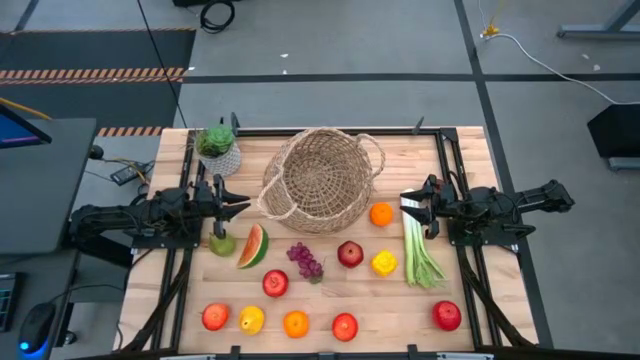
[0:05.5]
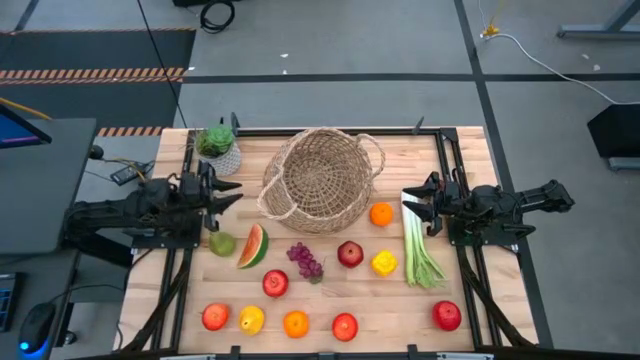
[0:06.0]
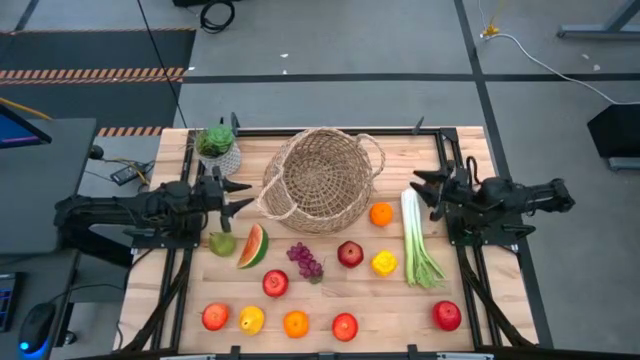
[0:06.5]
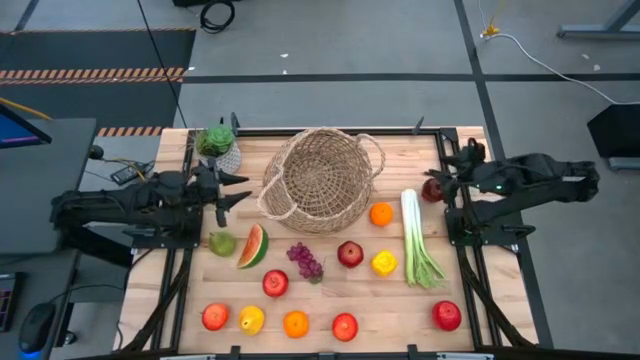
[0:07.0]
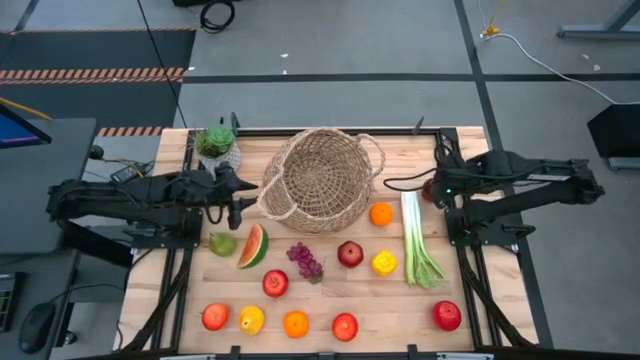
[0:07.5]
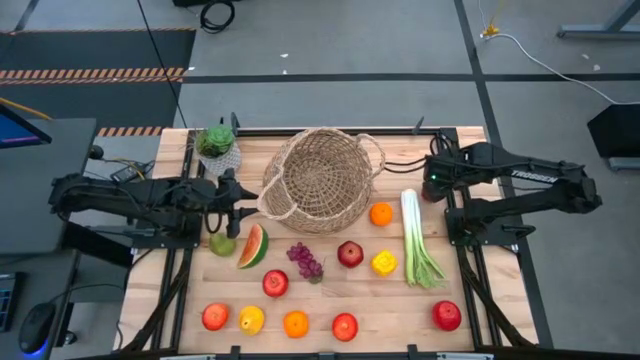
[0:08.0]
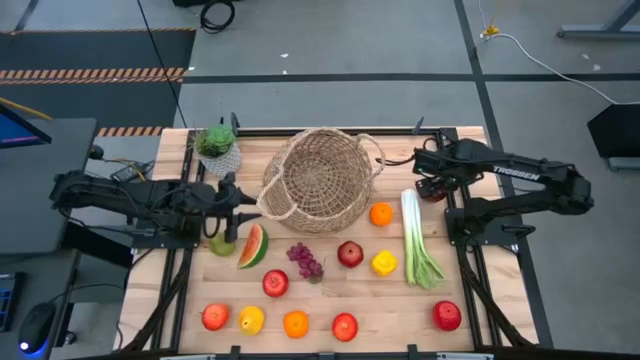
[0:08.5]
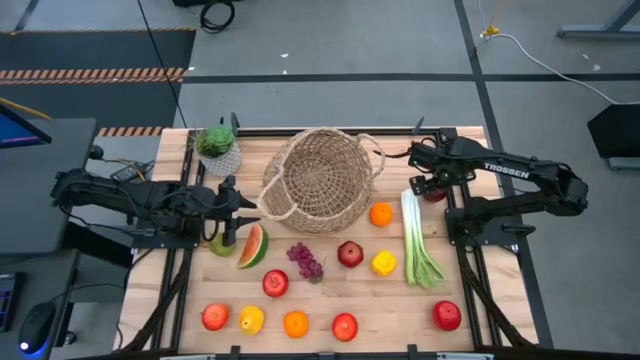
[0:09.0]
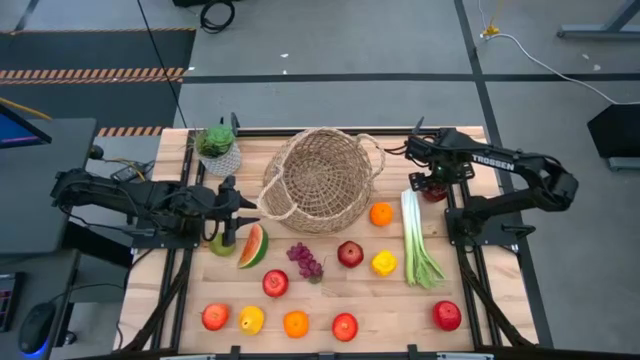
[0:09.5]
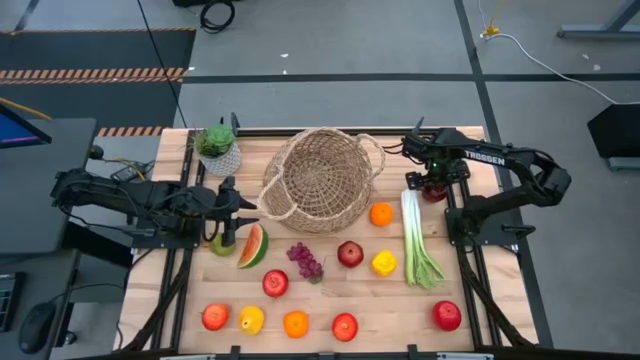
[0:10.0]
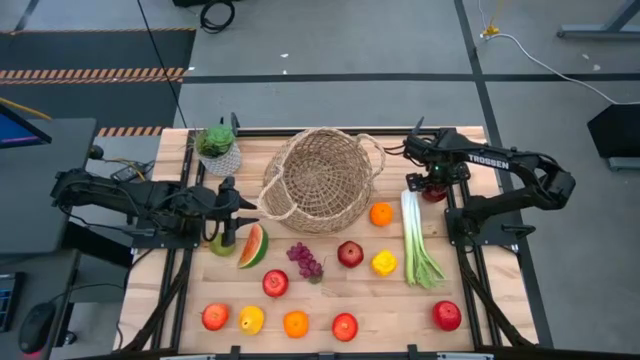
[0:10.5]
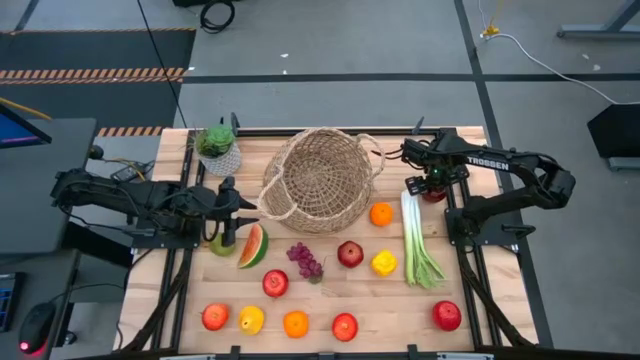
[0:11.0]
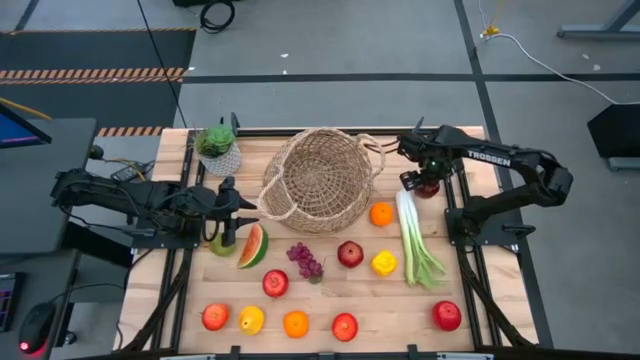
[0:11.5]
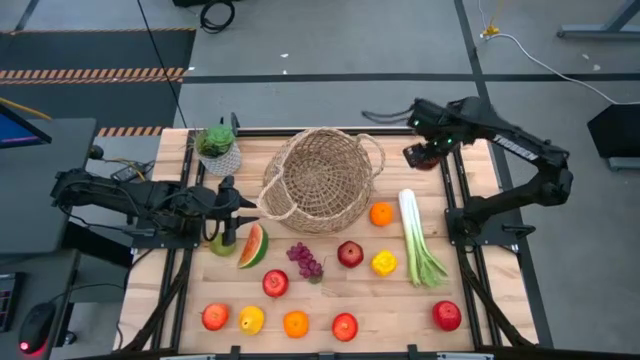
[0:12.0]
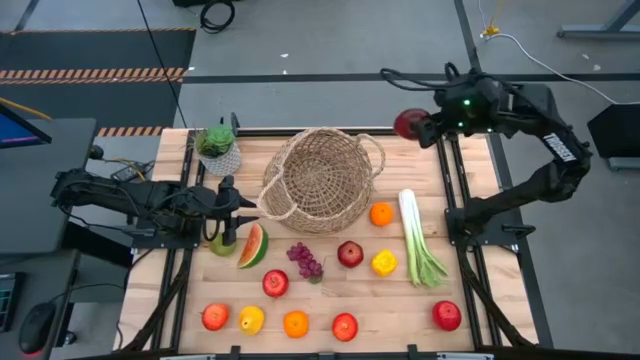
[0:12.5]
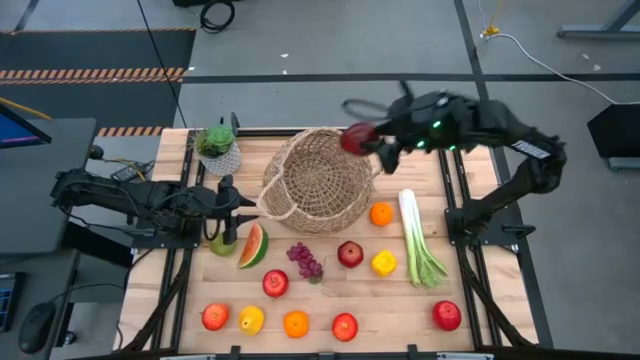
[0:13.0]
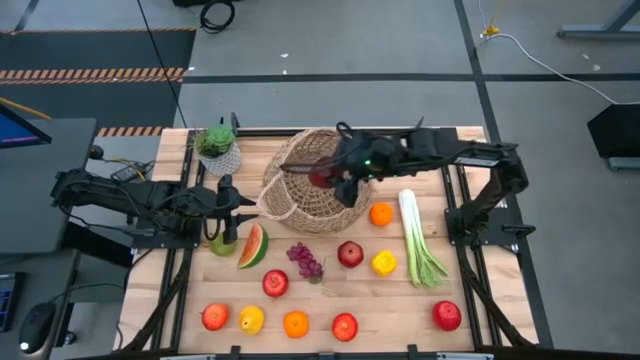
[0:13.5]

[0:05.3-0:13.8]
Task: Build produce basket
Put the apple into the basket

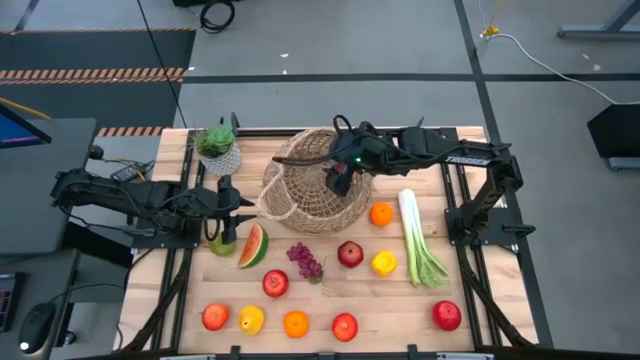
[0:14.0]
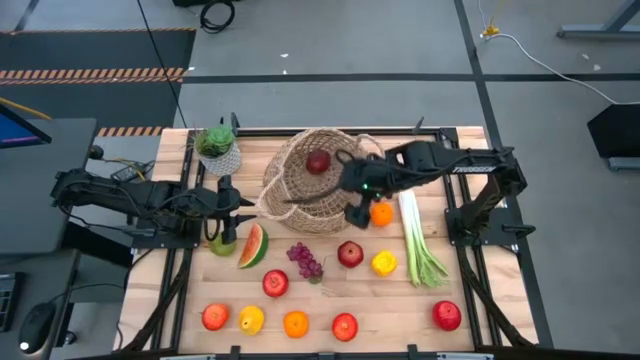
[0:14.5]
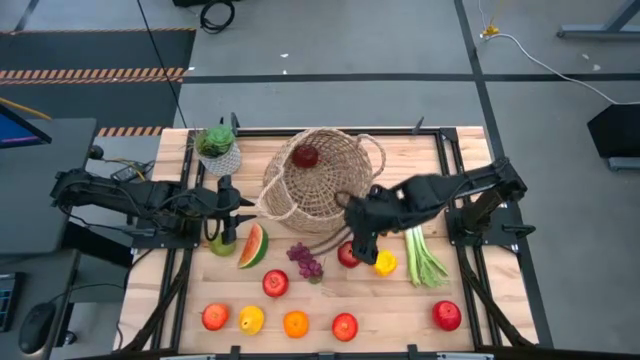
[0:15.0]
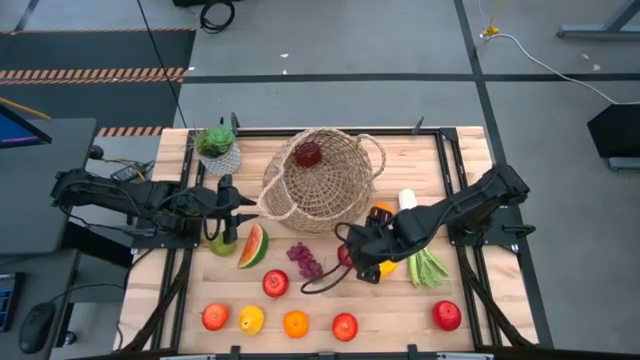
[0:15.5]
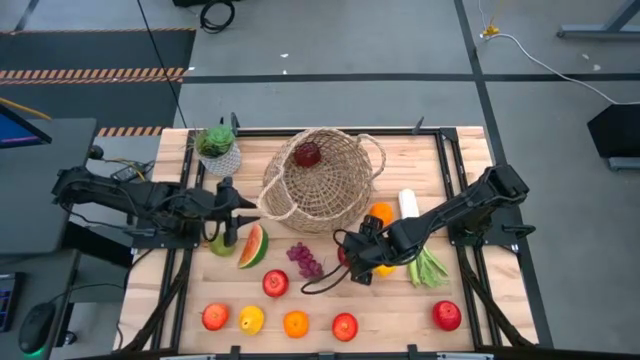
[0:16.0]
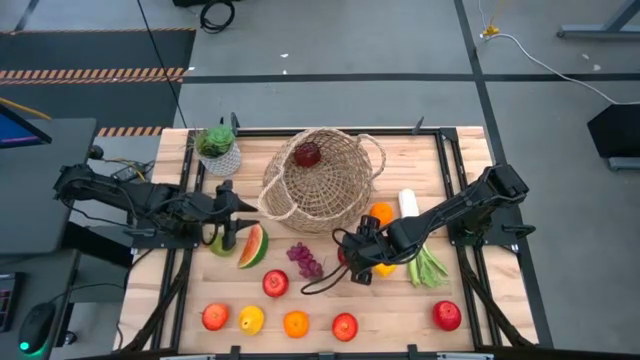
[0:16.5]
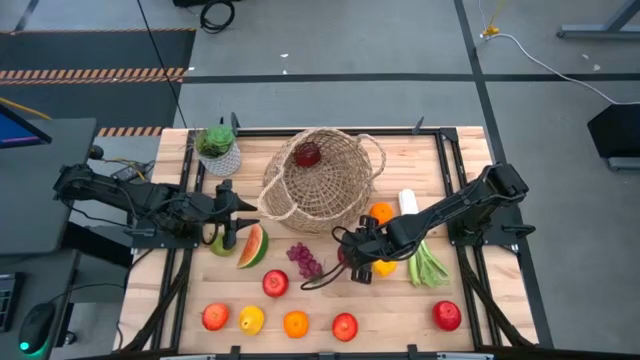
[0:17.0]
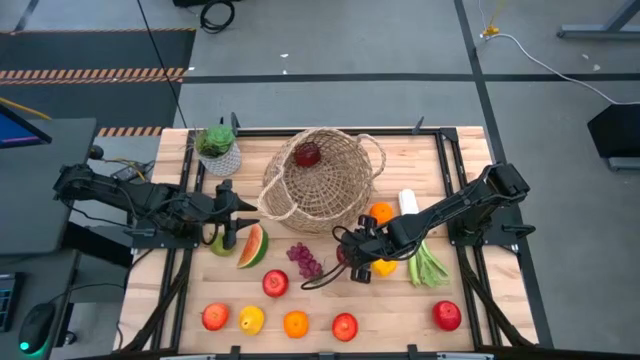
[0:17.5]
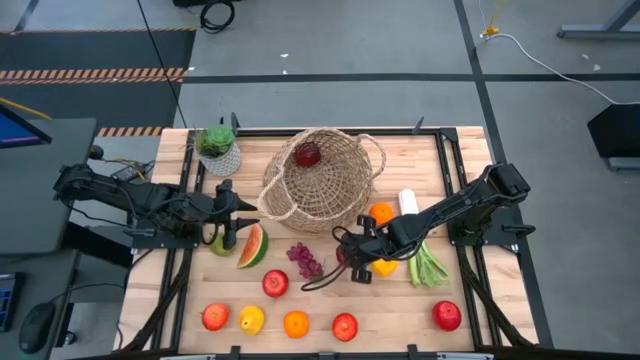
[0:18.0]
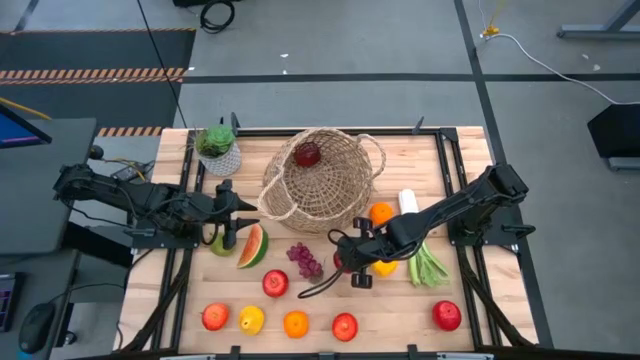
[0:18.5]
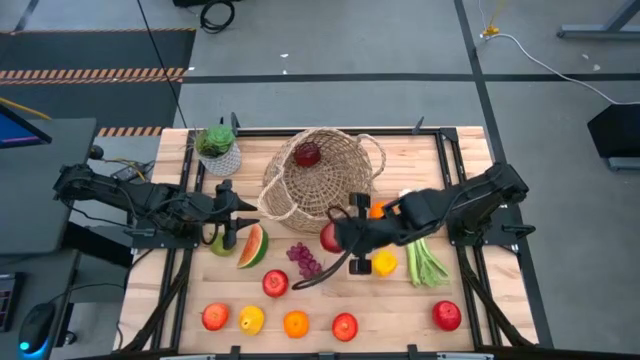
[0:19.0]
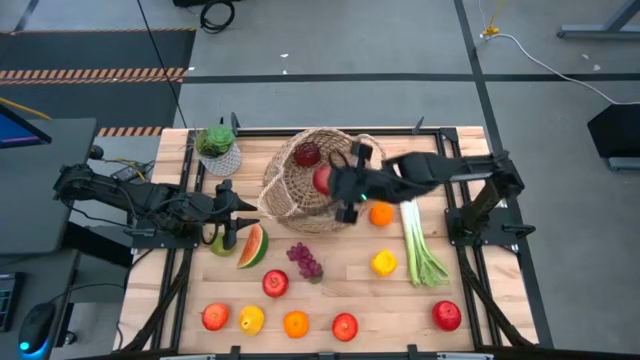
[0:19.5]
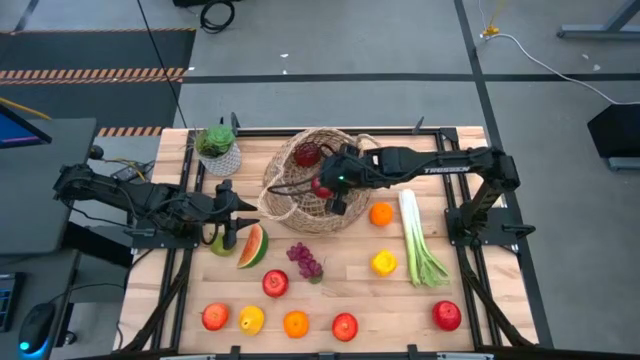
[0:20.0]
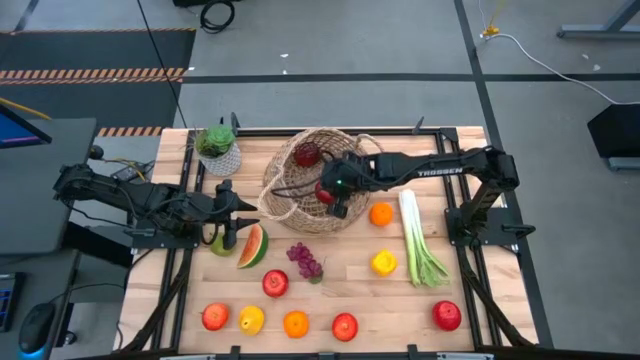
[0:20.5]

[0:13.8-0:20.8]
Put the pomegranate into the basket

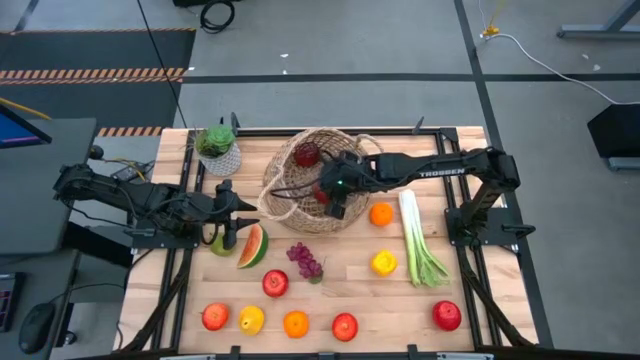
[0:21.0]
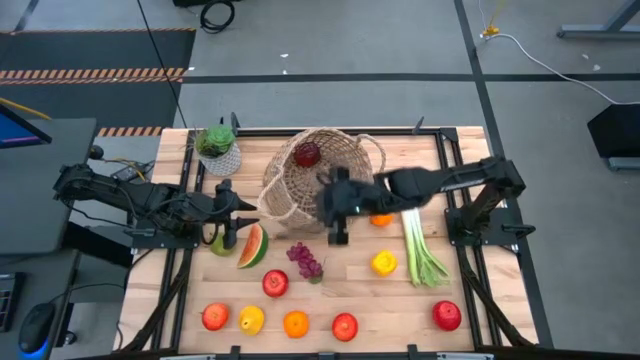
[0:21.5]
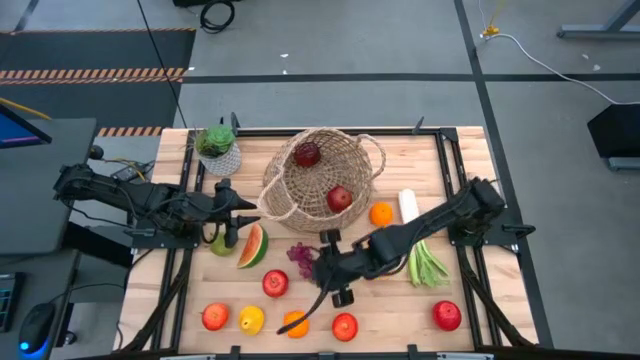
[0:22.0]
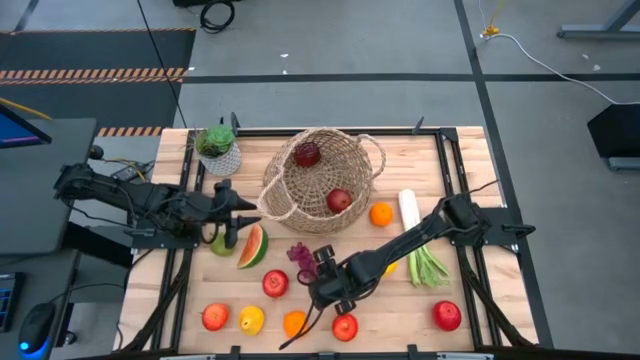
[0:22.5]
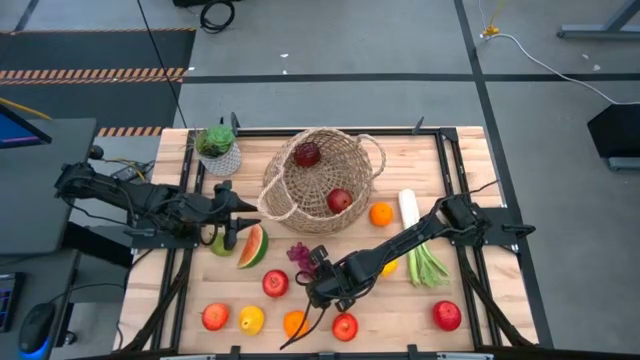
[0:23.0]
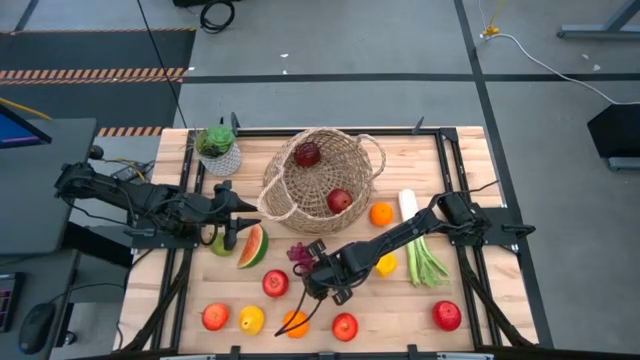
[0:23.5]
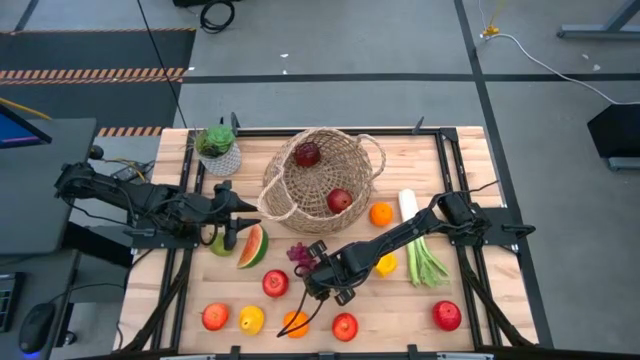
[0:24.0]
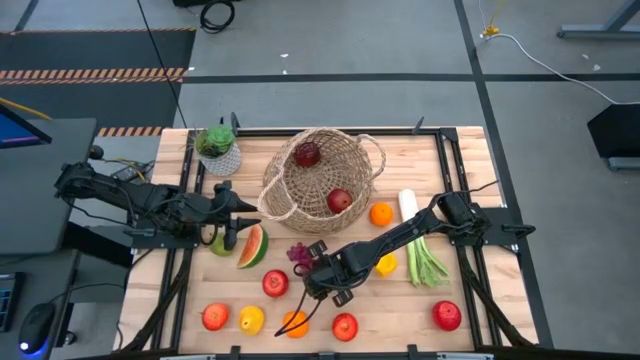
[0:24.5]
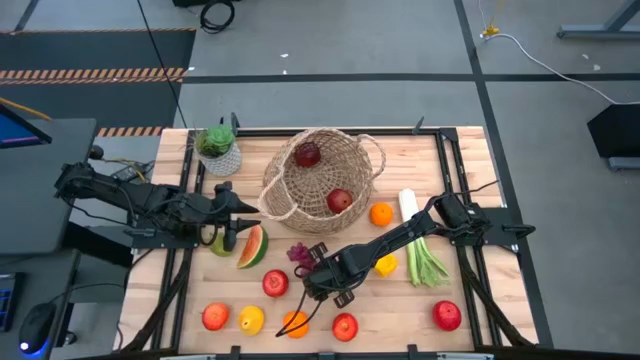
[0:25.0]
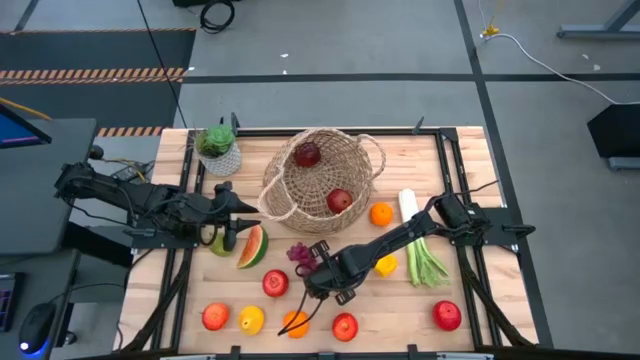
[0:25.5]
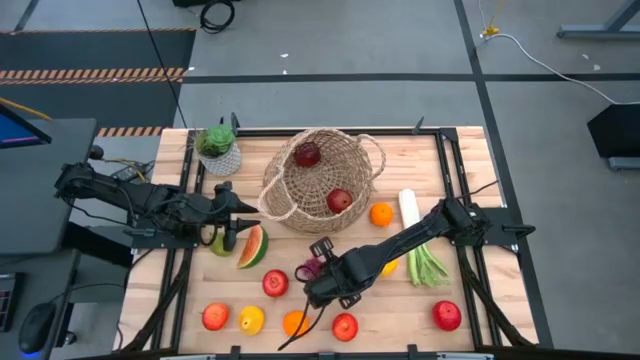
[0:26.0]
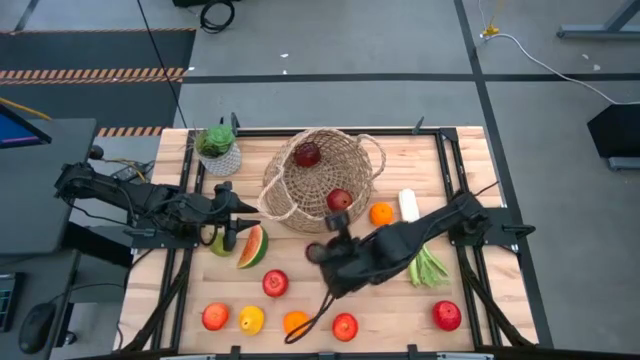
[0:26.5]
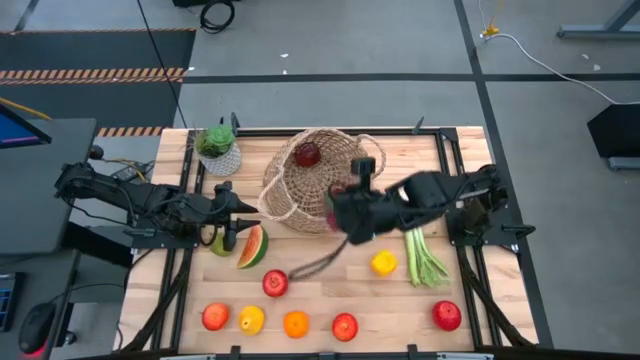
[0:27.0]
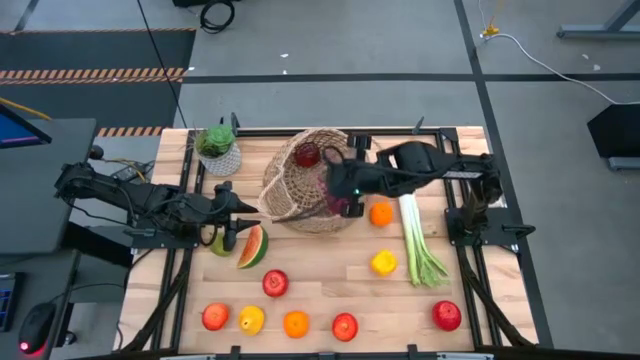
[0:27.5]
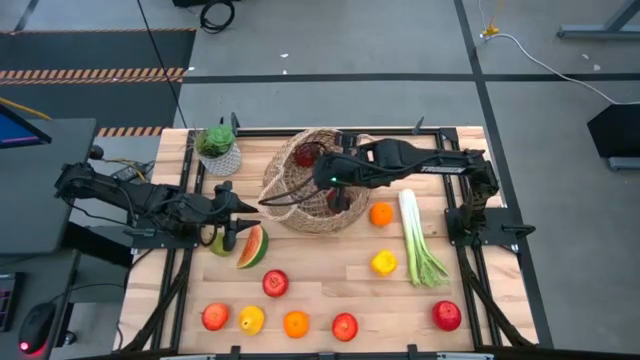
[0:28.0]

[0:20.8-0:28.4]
Put the grapes into the basket
